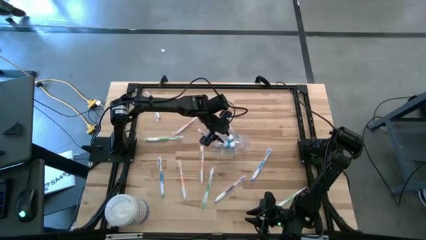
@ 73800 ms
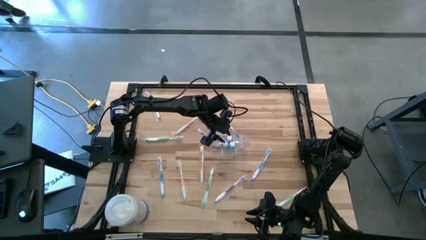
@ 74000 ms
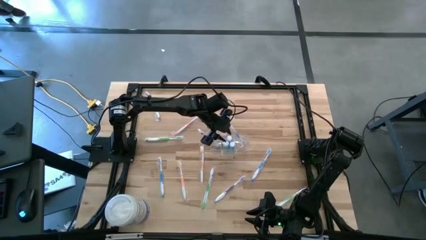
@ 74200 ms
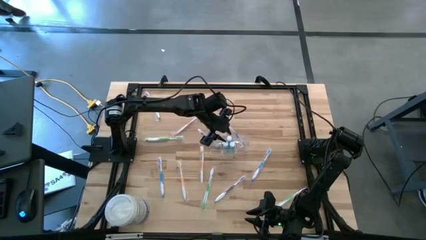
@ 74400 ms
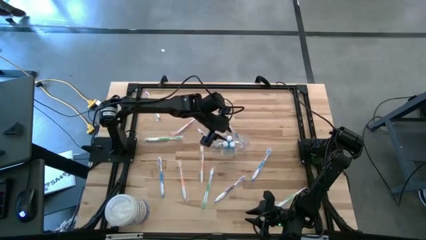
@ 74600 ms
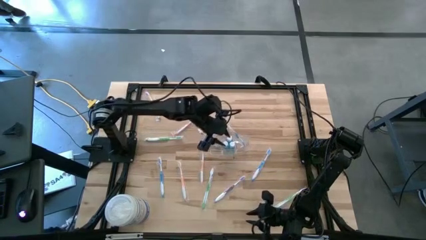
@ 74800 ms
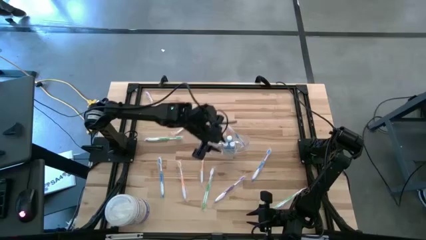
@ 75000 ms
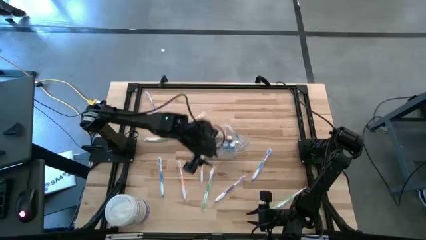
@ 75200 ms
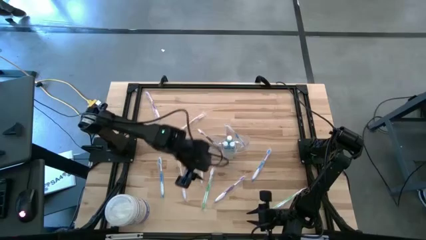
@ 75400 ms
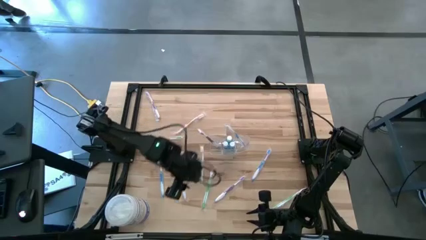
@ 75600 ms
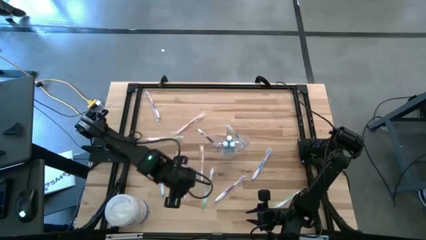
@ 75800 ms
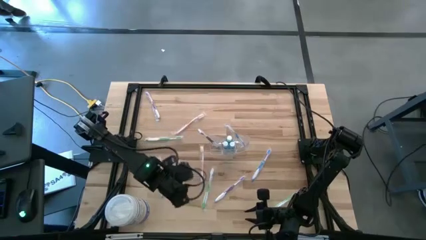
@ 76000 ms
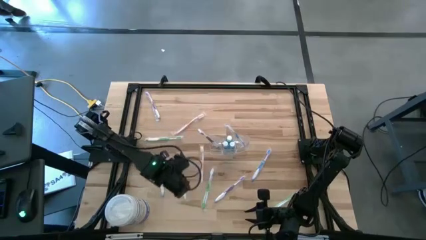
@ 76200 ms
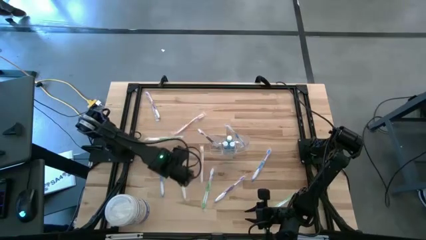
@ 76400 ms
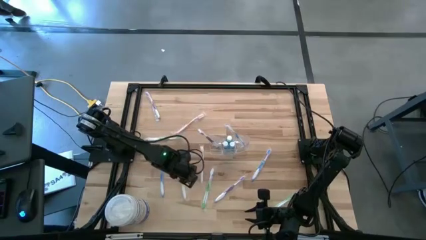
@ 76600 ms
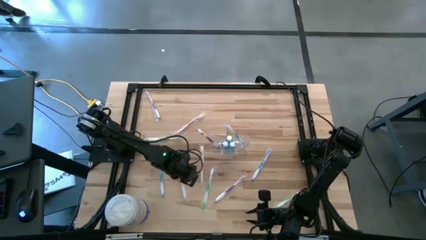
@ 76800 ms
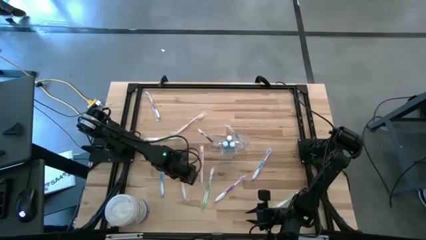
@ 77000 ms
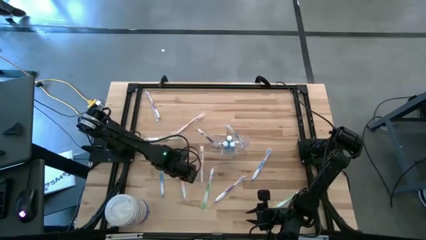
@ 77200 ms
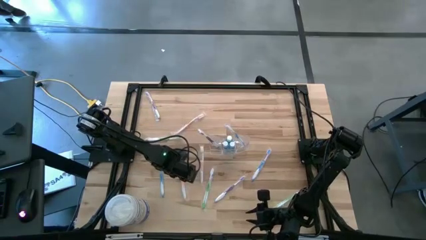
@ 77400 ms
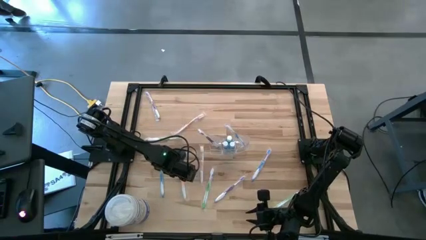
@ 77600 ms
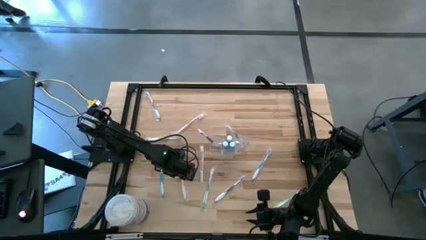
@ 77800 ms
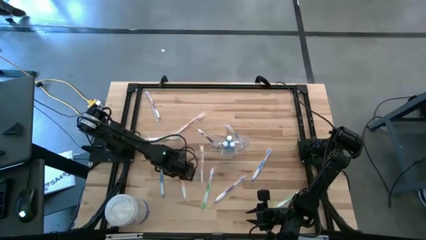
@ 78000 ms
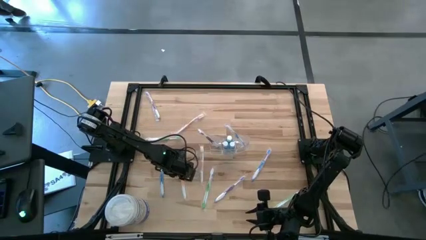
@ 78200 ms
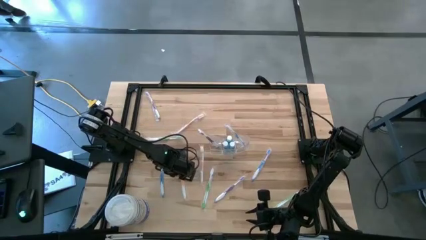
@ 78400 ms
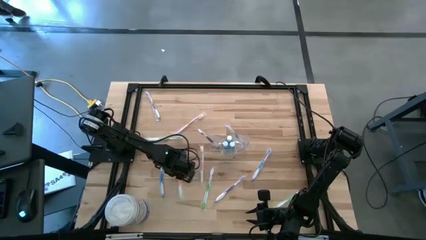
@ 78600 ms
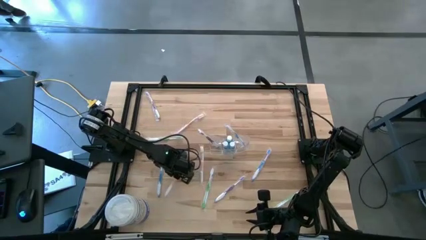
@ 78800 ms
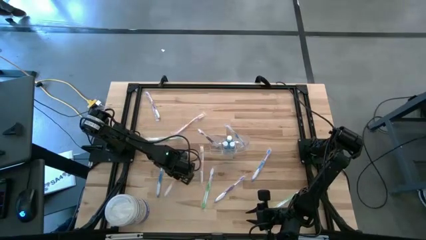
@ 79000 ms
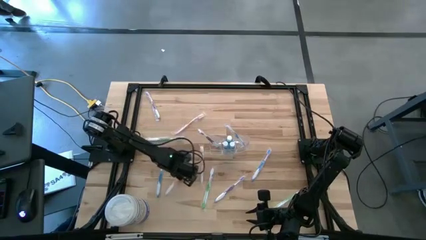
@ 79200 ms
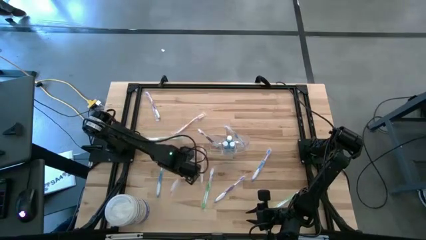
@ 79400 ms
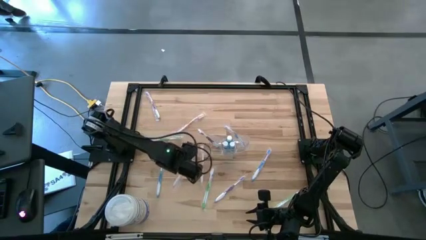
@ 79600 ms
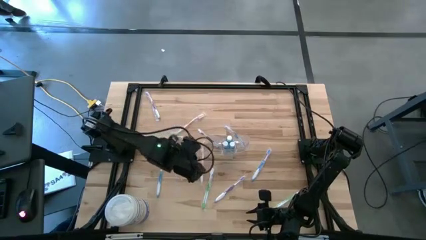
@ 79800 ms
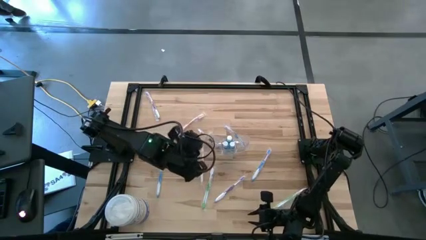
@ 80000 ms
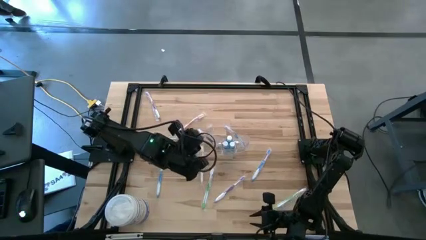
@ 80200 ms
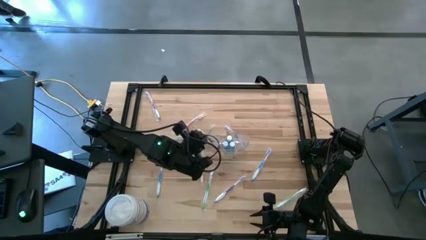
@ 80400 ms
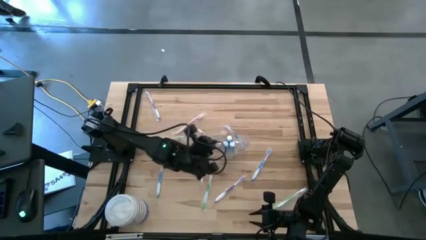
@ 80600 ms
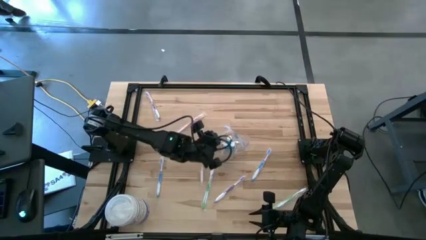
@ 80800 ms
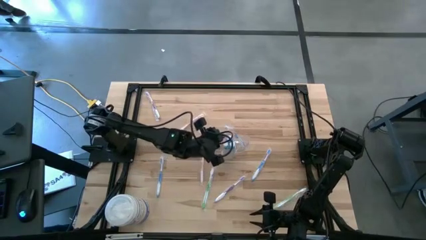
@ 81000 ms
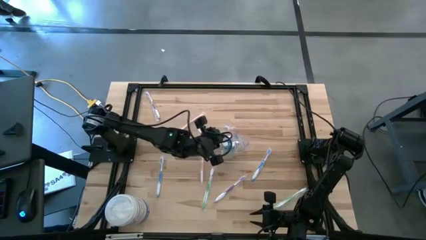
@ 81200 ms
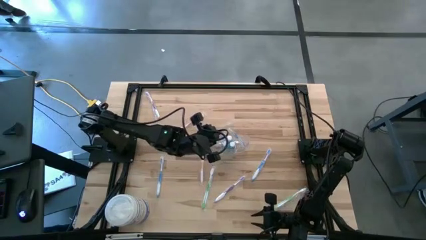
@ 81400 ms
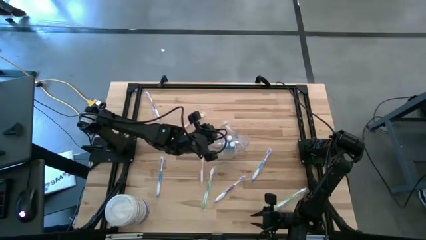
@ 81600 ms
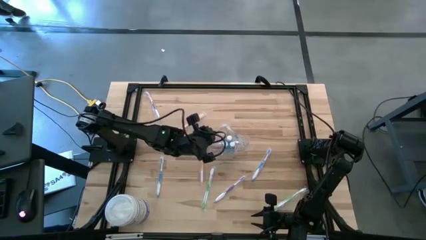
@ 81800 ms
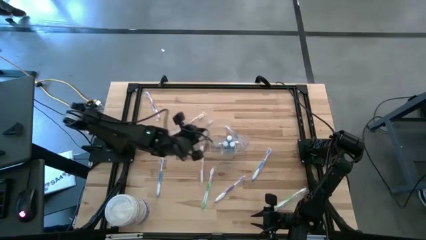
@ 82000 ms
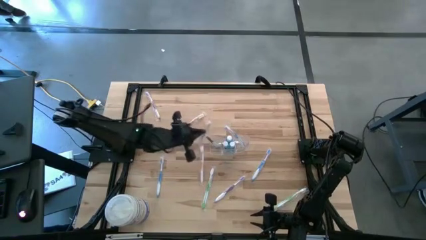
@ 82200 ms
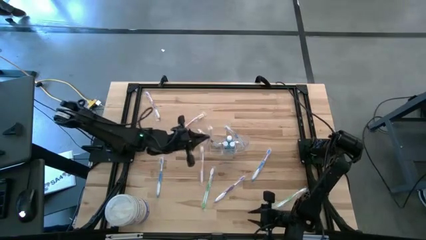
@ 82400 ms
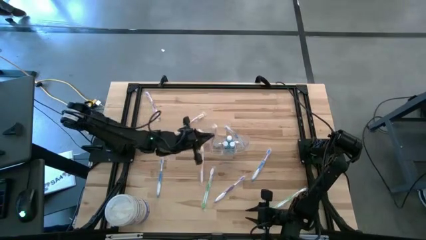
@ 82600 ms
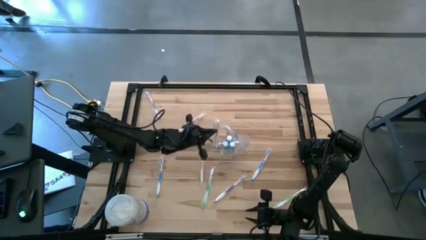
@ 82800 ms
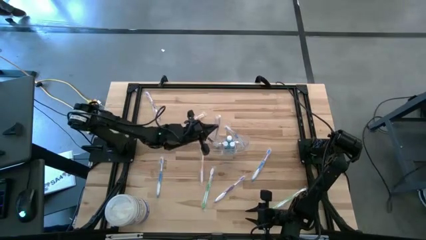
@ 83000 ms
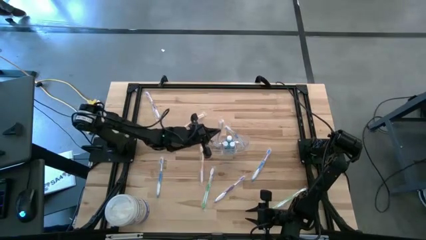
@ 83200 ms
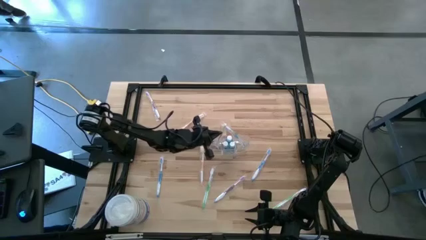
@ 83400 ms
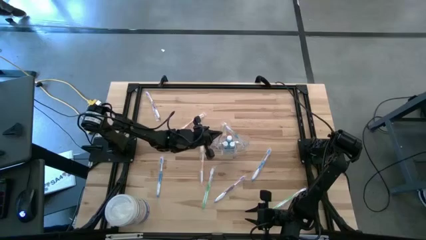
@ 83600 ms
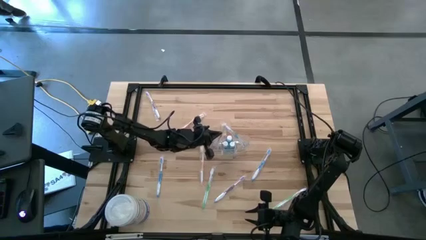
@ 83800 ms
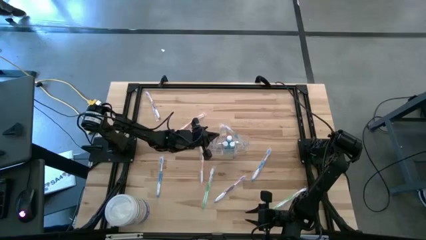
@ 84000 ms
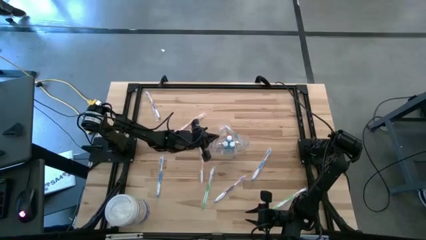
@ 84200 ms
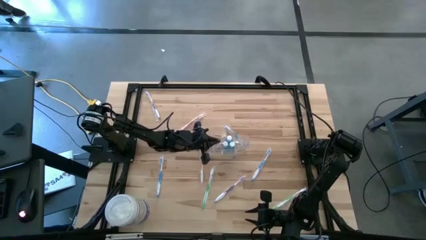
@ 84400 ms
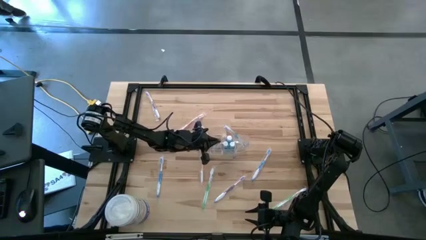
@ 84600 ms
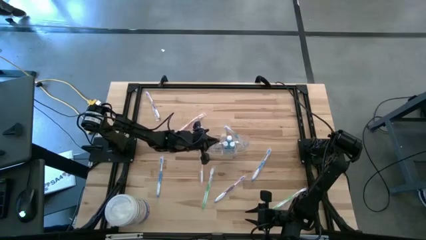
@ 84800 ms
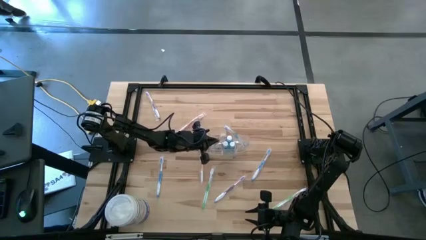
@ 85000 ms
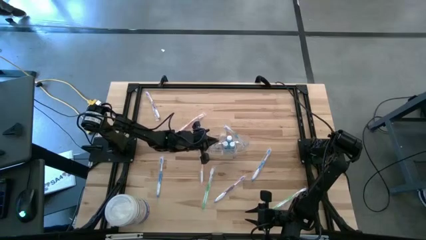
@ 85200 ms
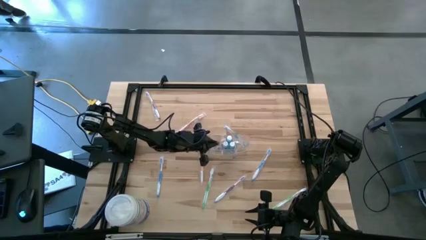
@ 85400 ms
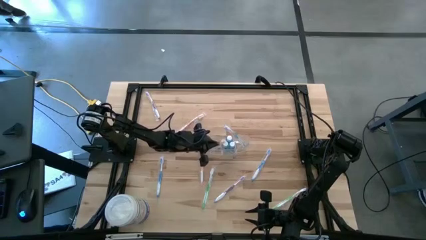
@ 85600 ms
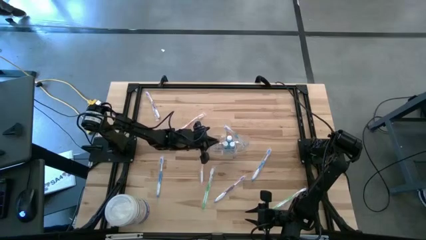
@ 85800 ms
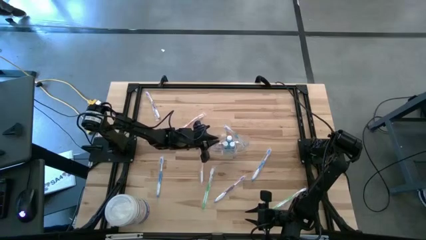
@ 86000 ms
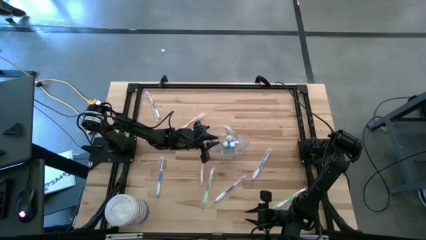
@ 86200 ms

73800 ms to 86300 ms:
Task: Pick & Place toothbrushing station
Put the bottom left orange toothbrush into the wire organizer
